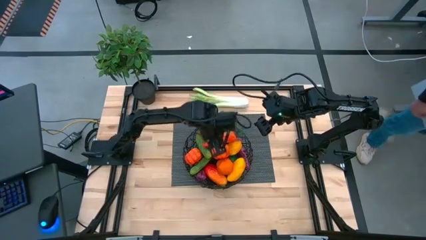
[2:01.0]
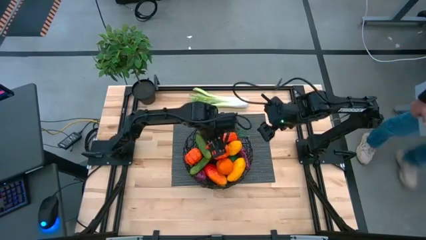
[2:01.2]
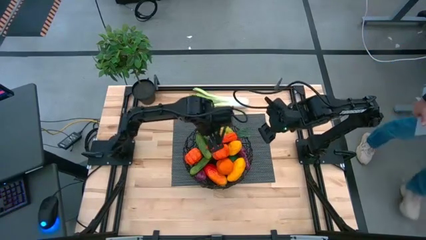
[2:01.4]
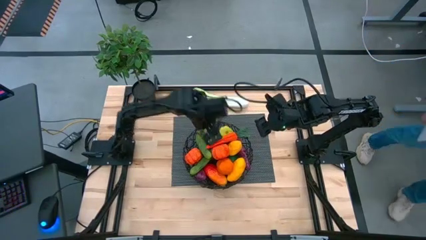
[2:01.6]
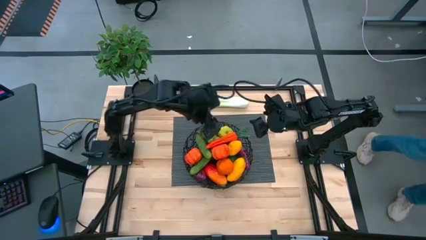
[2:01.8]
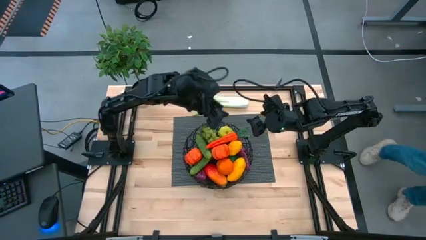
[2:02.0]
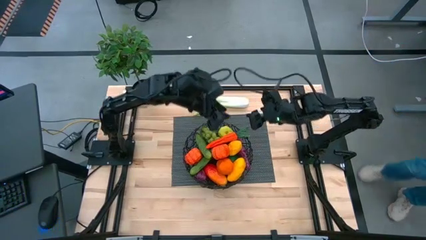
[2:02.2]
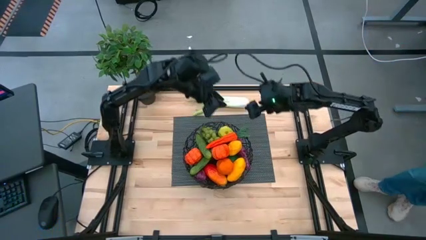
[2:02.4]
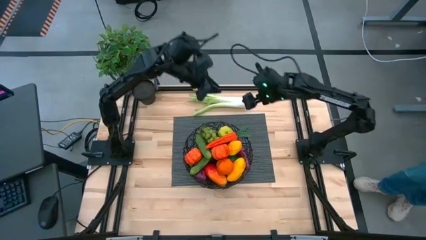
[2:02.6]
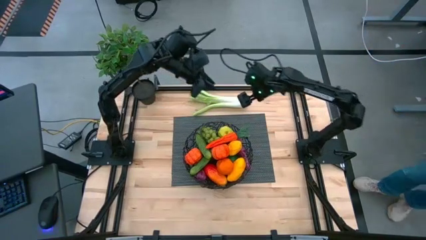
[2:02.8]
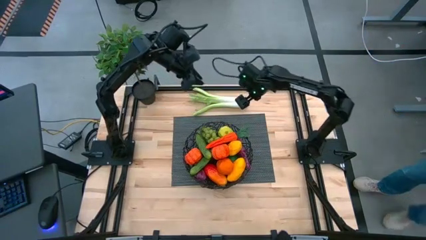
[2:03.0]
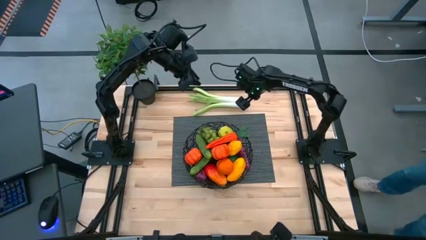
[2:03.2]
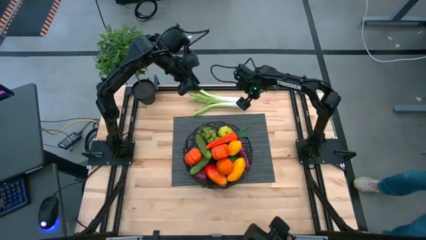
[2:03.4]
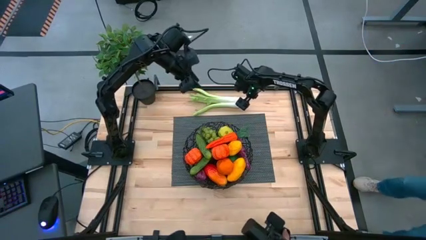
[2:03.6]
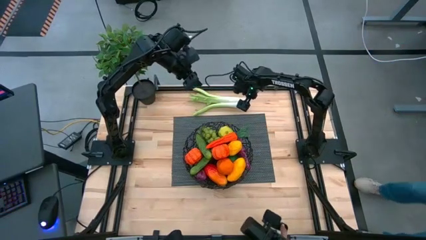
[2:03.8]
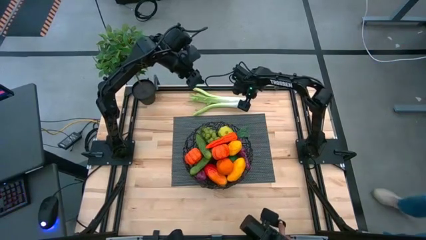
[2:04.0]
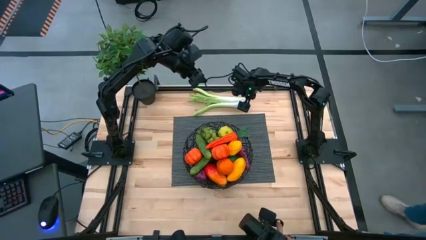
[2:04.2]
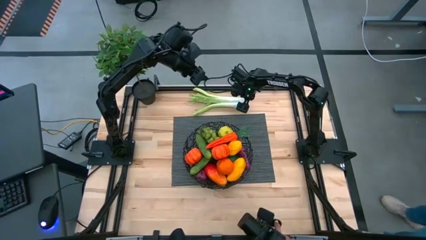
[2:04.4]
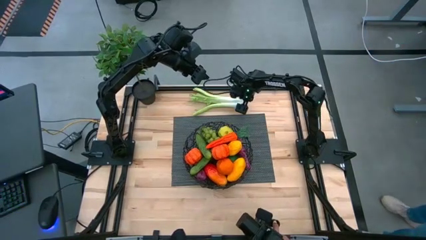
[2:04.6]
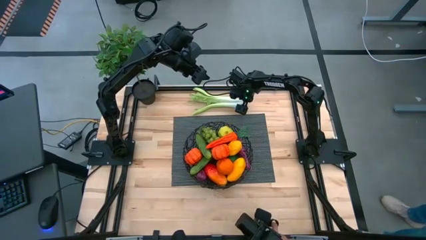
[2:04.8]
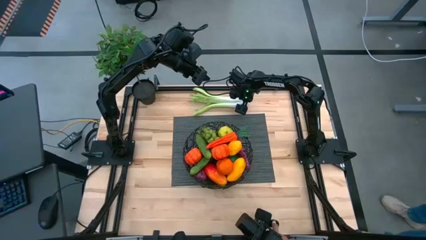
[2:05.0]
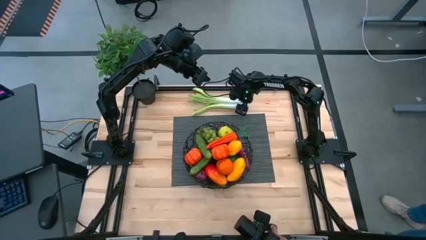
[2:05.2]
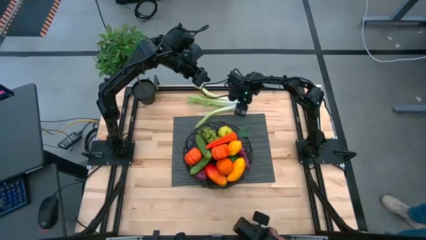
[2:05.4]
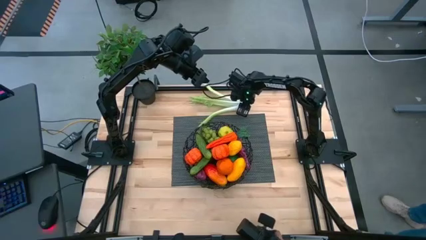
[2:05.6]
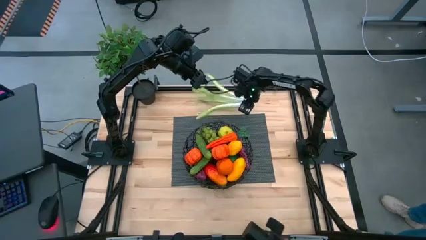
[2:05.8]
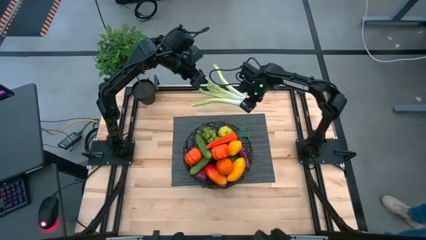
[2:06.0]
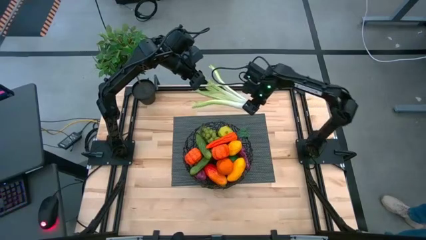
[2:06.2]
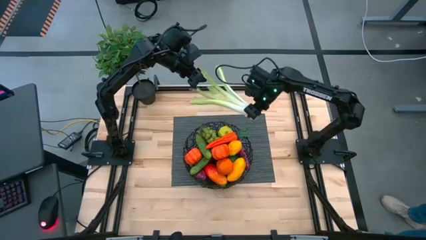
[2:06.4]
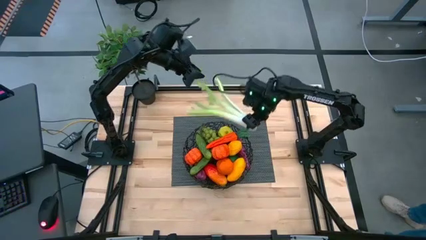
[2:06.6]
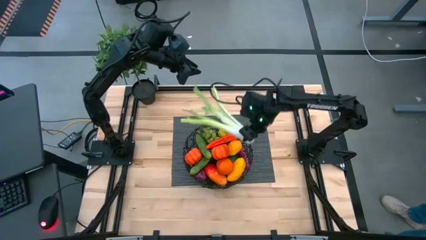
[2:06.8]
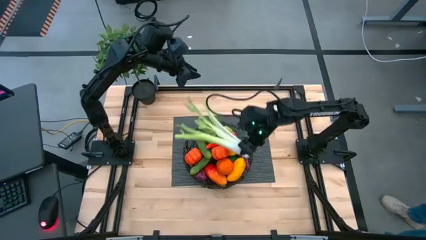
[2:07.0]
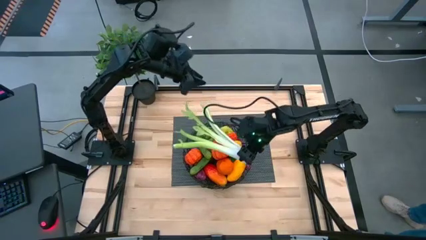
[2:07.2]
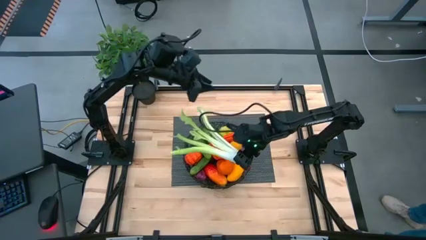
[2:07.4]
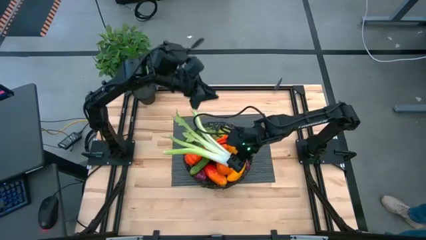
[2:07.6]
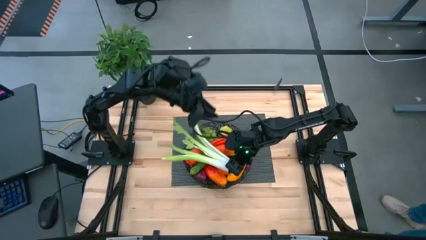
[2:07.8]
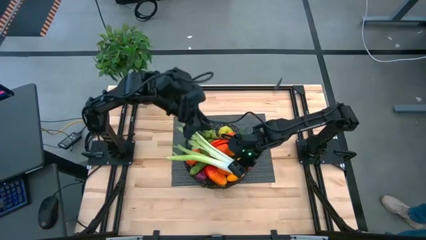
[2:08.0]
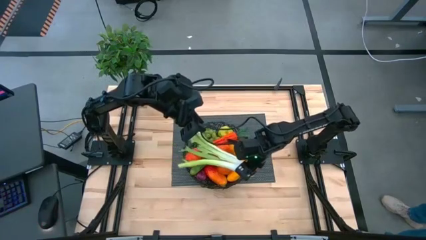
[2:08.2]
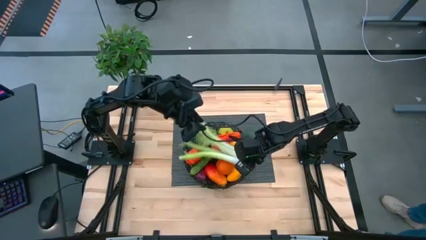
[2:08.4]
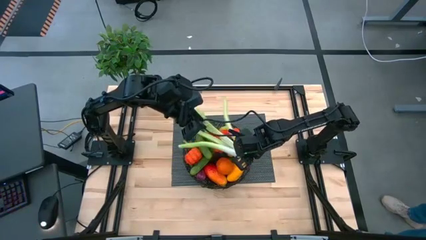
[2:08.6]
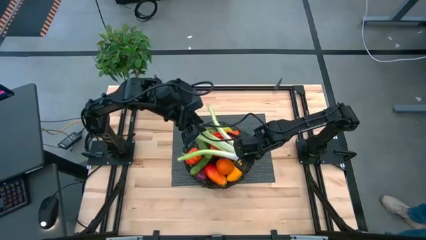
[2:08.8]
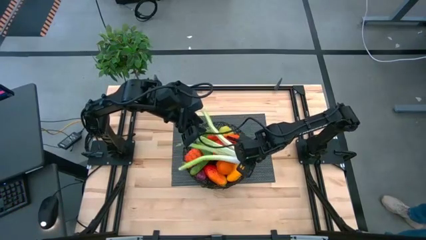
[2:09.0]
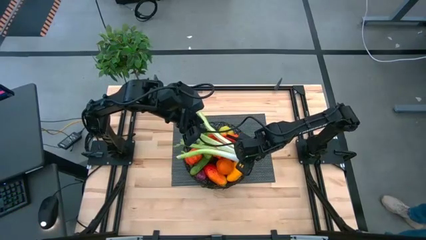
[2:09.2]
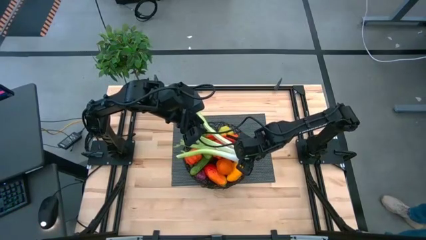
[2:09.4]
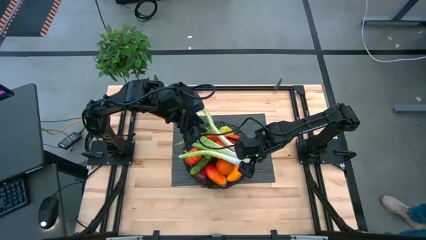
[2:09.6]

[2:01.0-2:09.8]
Task: Build produce basket
Put the green celery into the black wire basket

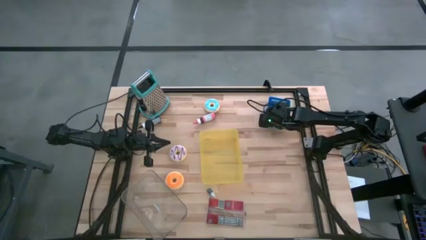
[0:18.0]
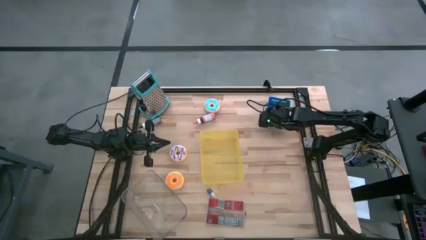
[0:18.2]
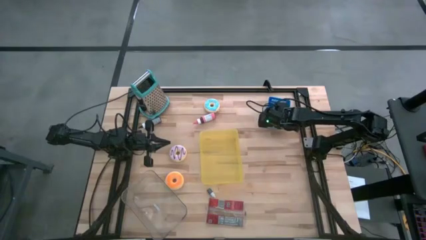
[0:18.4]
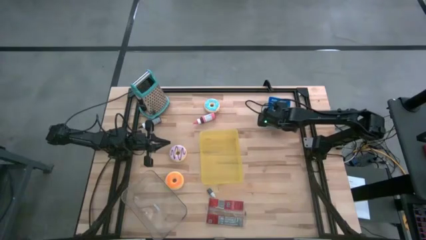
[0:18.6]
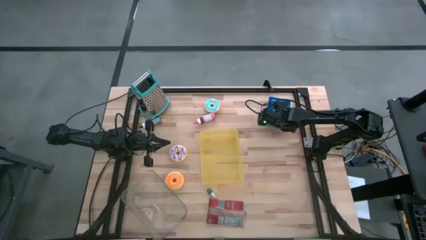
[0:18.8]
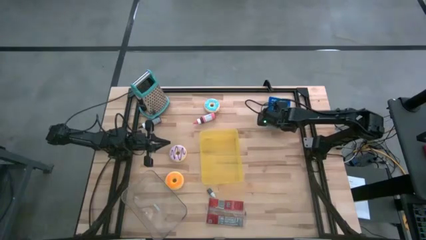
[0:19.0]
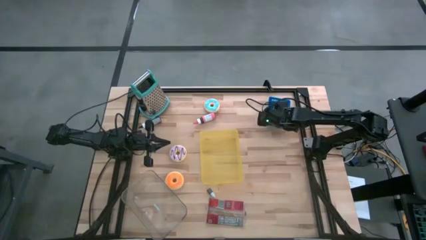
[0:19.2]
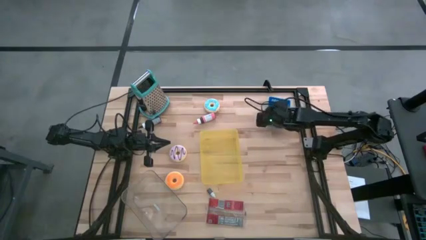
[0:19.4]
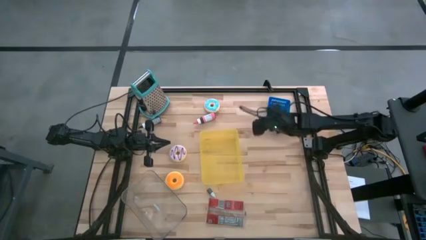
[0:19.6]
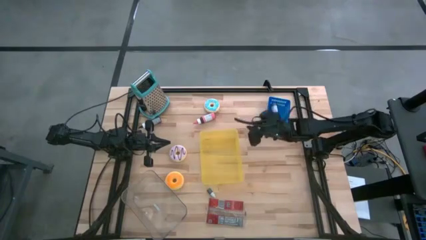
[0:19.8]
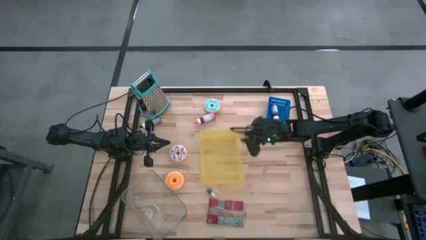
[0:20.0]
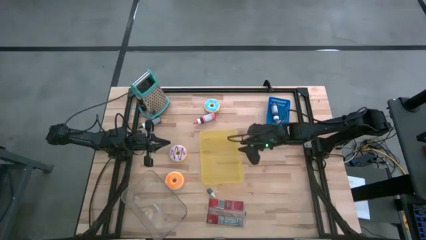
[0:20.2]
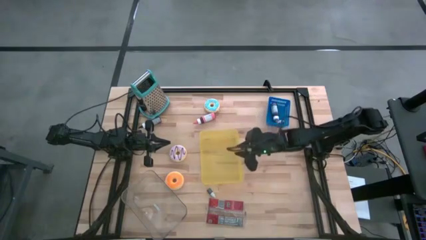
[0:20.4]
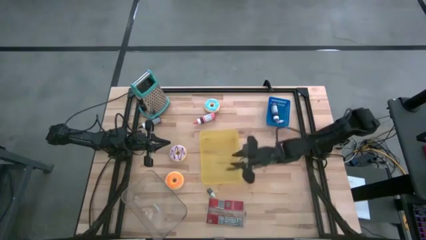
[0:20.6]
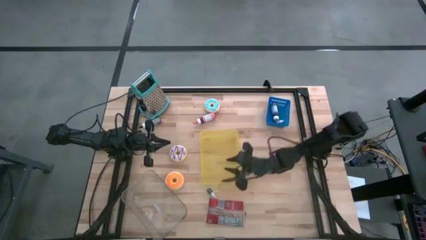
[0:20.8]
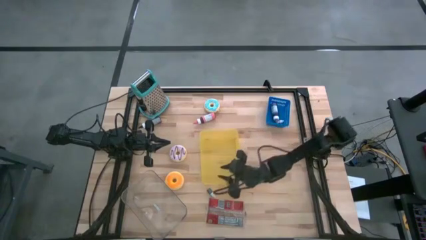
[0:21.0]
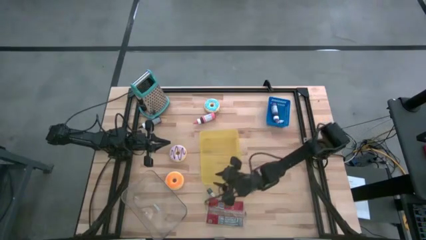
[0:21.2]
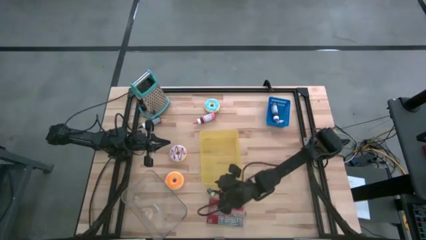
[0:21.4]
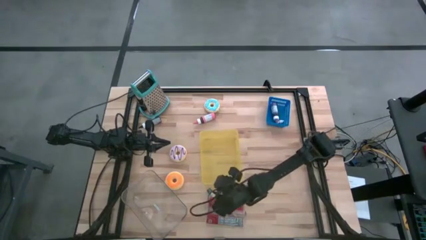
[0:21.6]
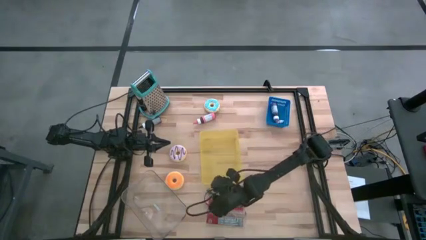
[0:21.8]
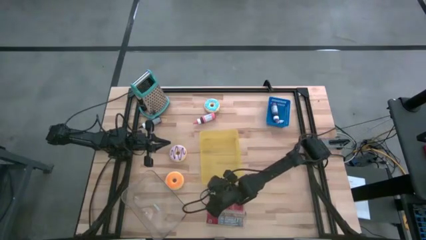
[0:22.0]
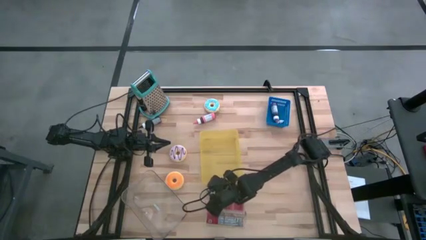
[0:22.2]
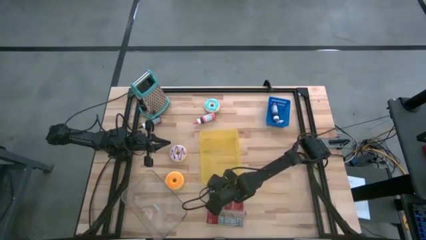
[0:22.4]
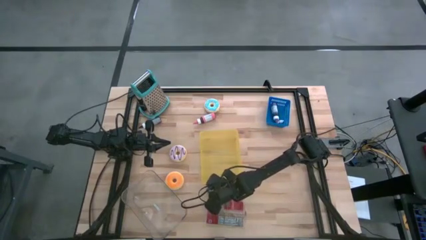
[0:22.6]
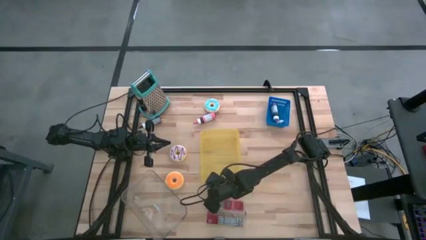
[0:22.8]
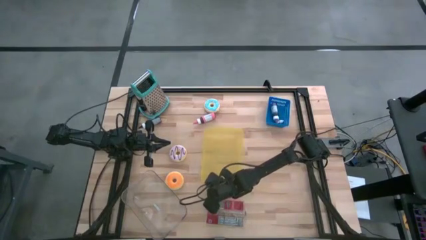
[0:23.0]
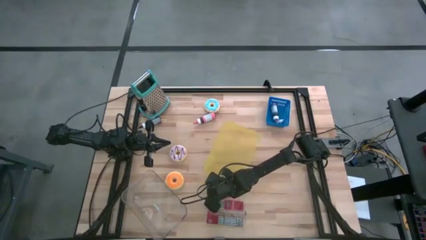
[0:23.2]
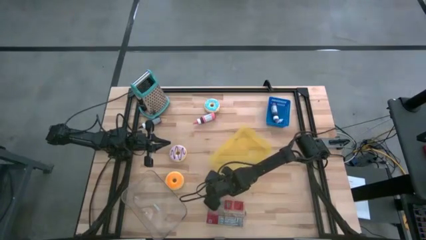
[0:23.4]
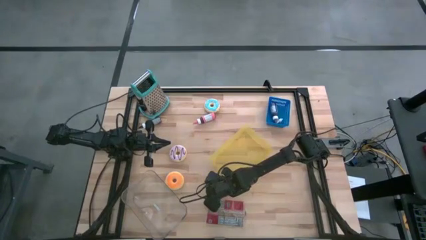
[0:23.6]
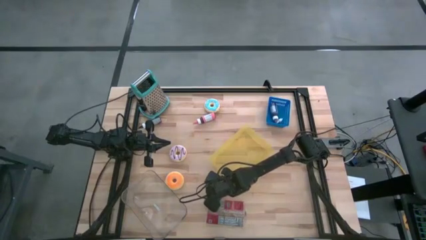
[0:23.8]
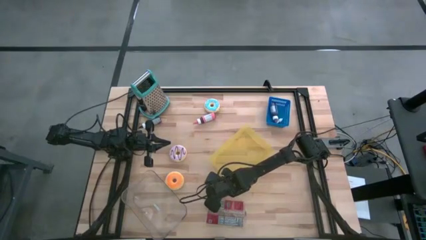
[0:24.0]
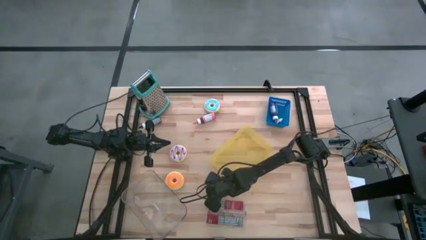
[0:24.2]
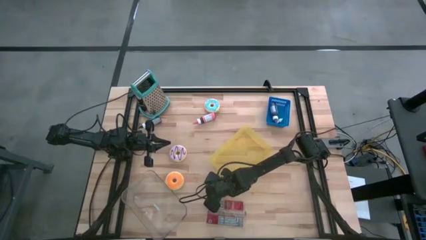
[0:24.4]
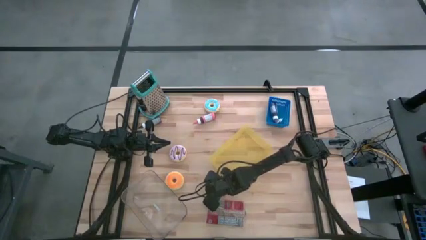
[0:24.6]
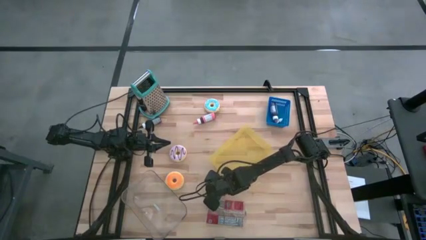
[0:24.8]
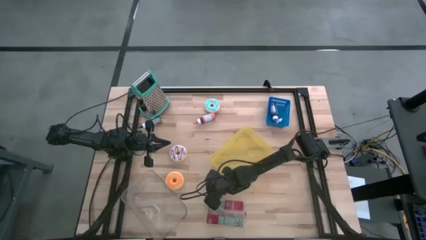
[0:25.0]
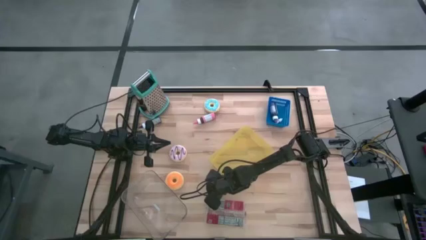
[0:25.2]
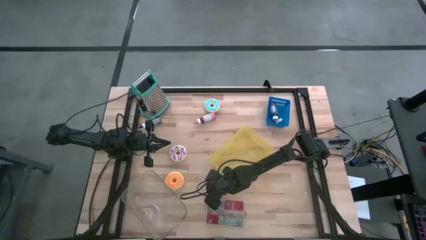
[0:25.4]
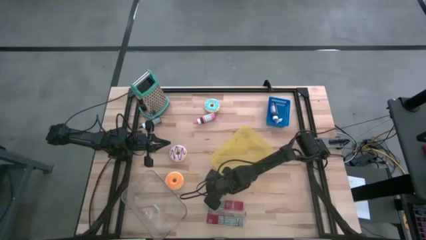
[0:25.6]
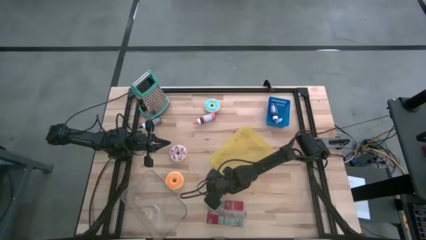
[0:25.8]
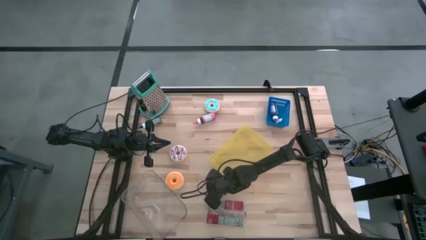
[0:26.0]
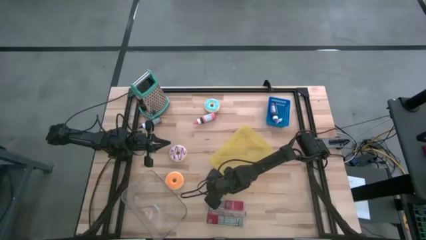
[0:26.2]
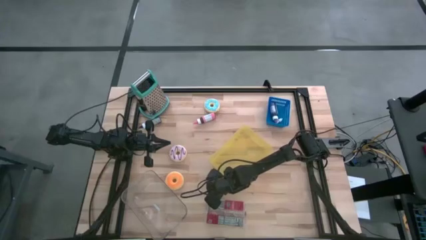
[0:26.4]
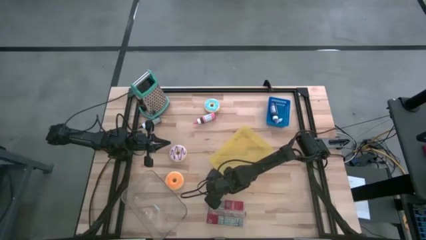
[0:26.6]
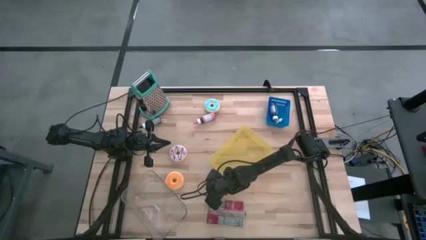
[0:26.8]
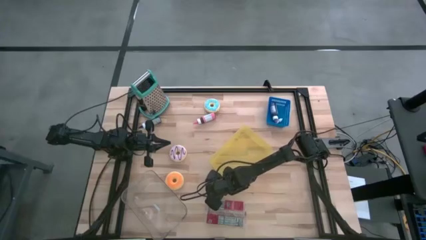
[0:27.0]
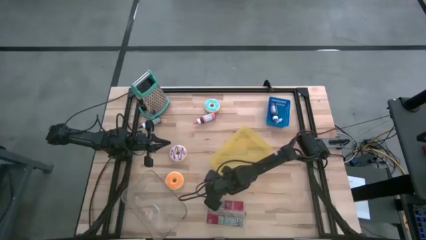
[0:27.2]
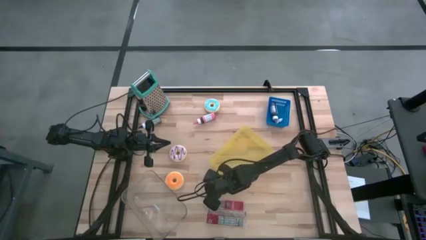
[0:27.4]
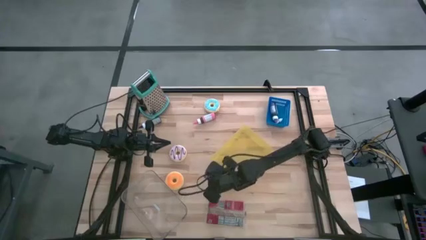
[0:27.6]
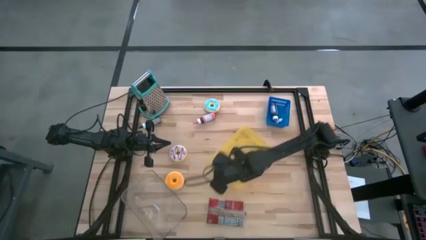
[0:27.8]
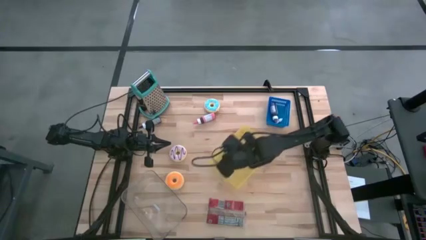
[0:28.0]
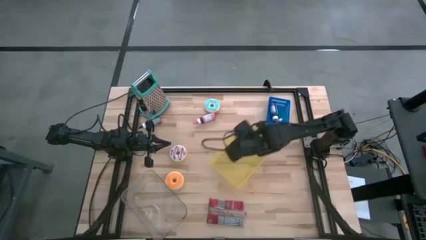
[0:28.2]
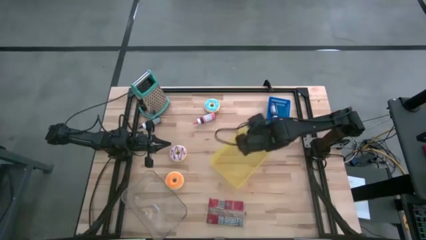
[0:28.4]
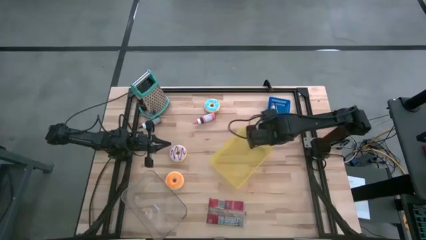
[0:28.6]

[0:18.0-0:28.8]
Task: Pick & Place Food Item
Put the small black food coloring bottle into the blue bin
